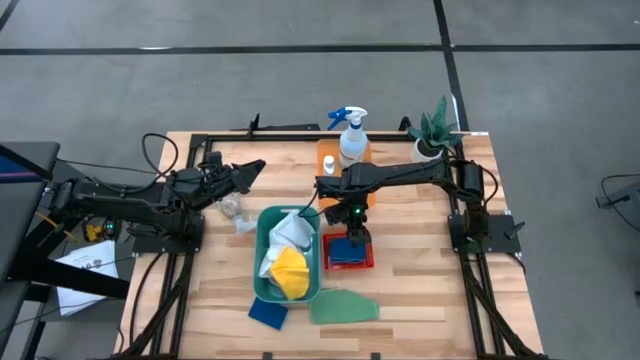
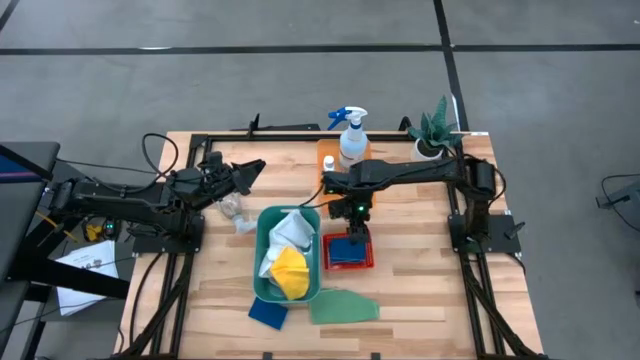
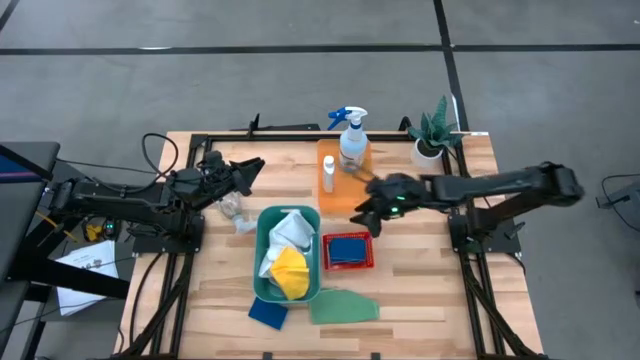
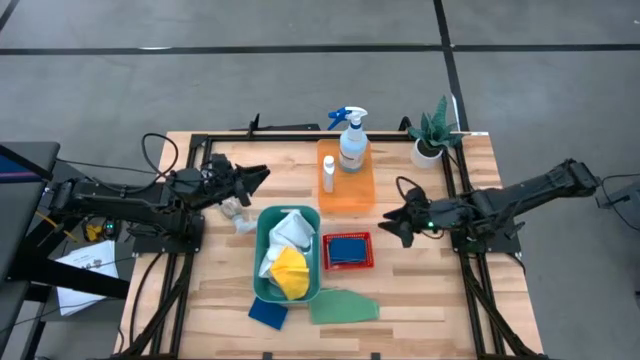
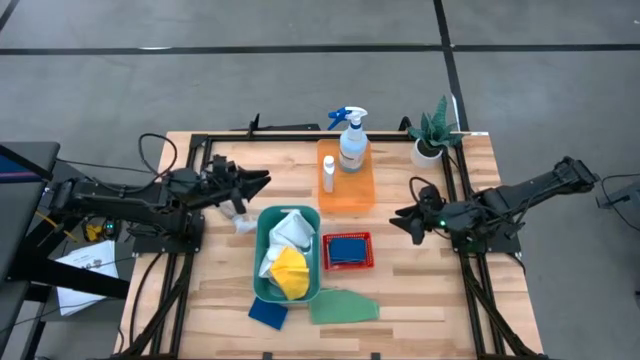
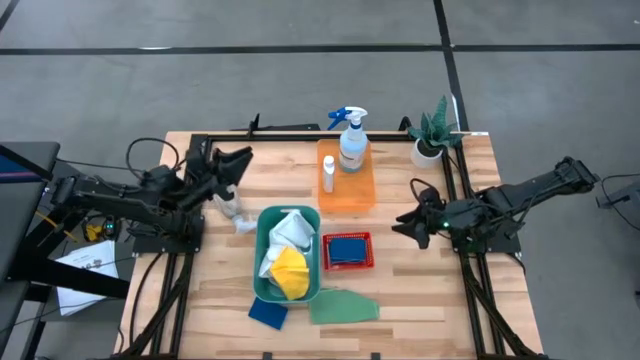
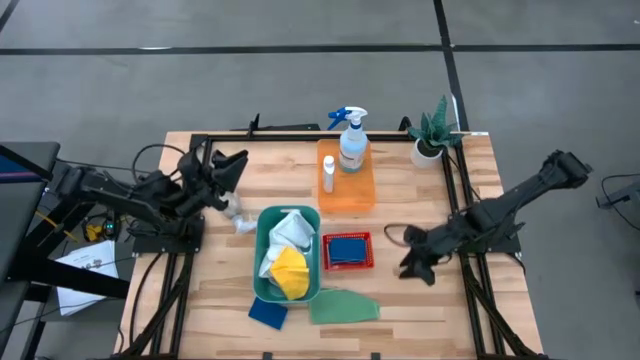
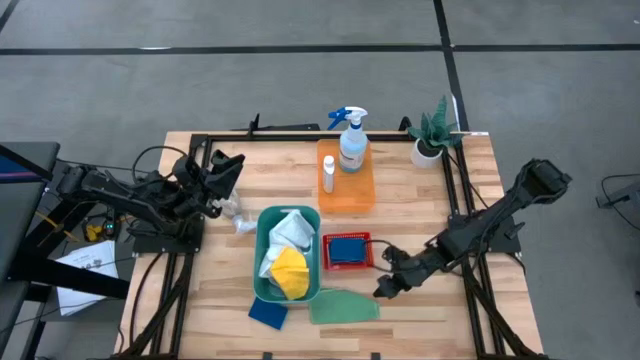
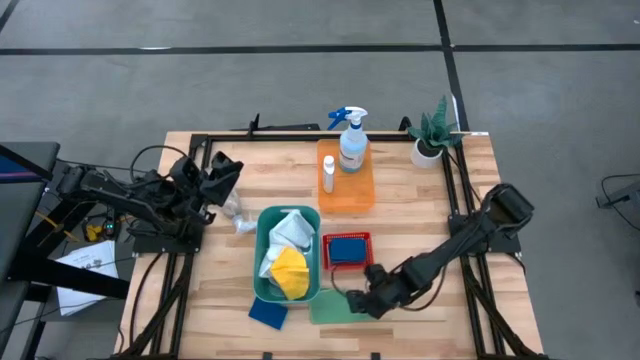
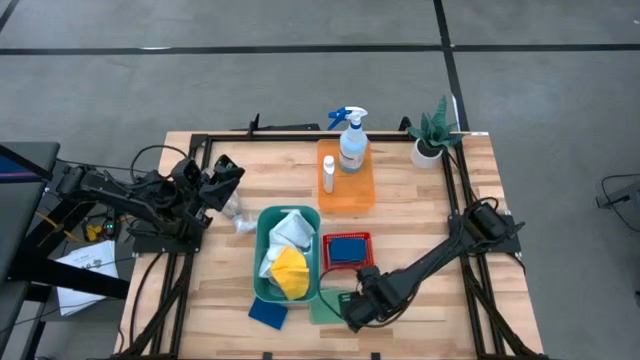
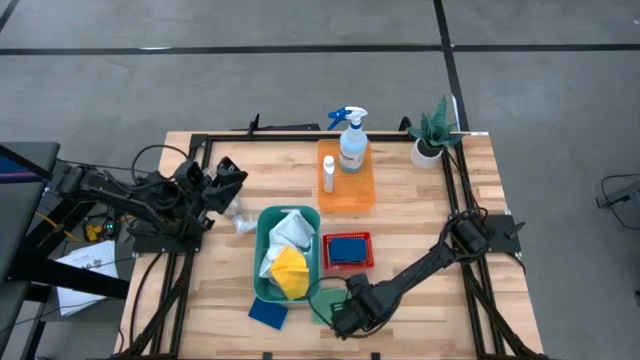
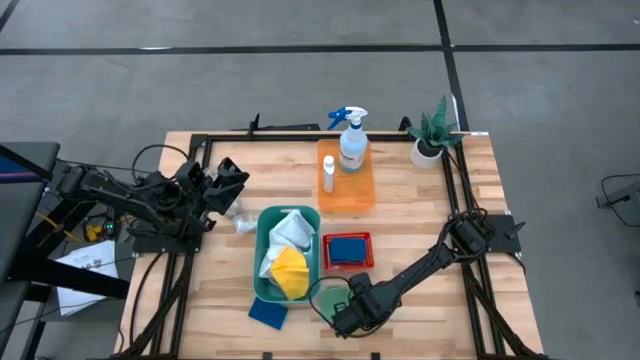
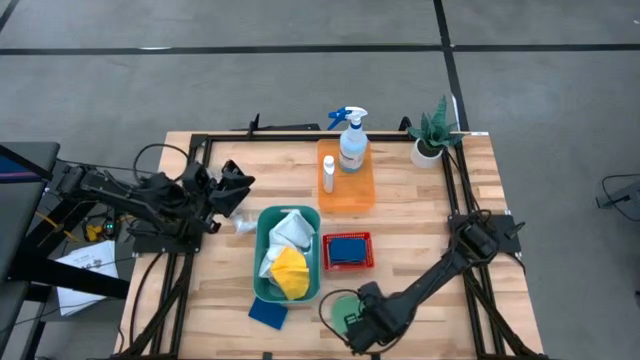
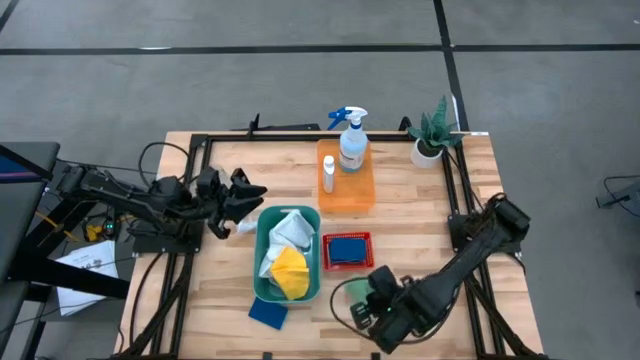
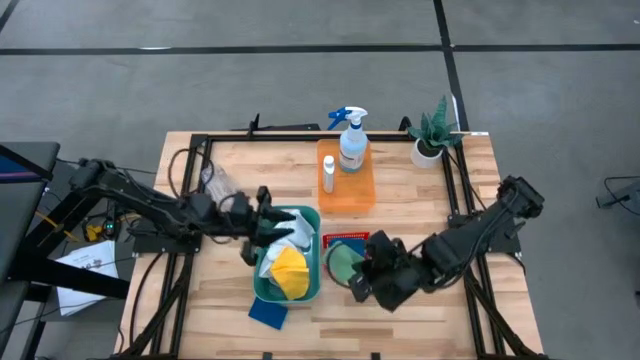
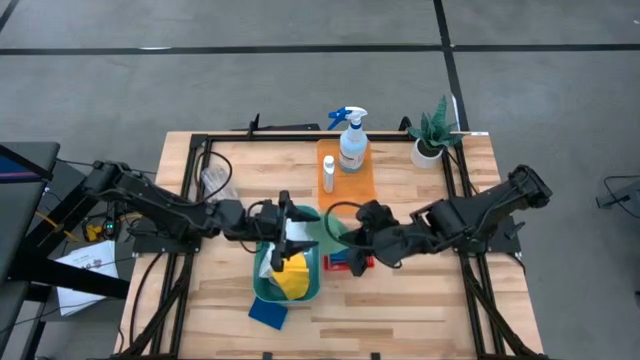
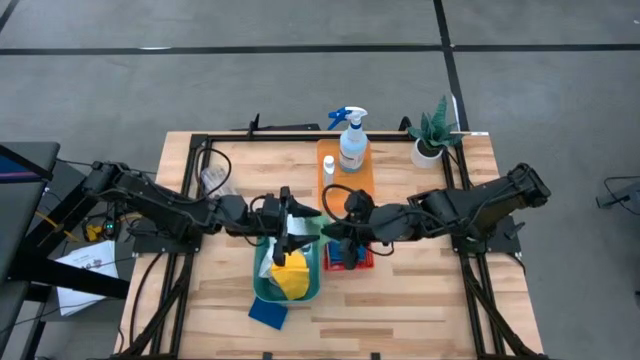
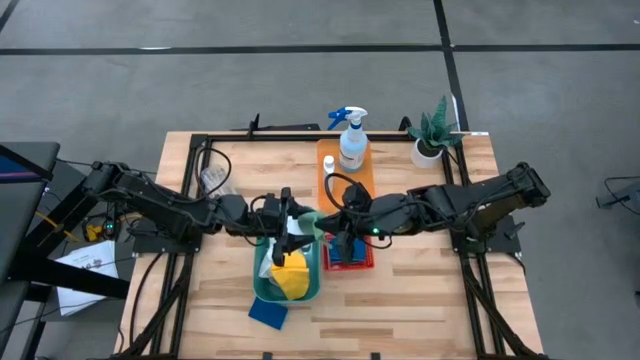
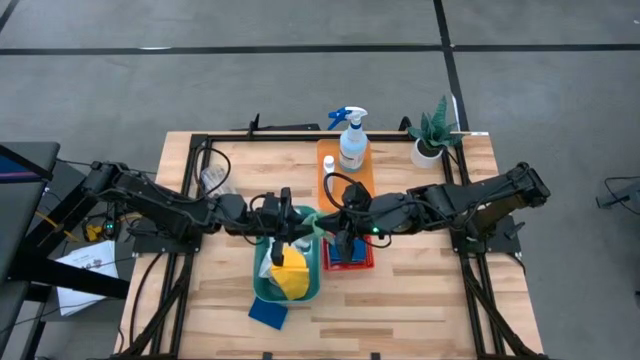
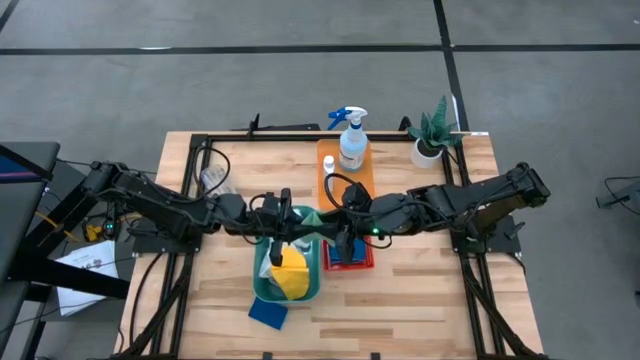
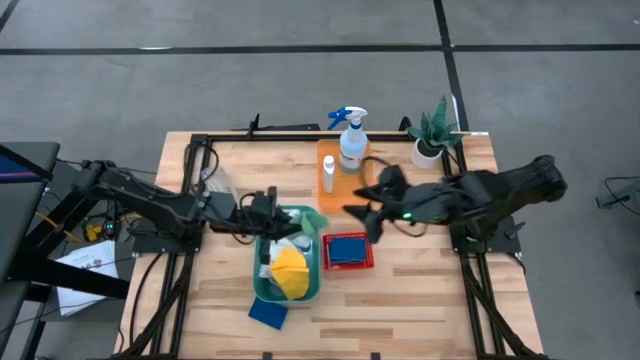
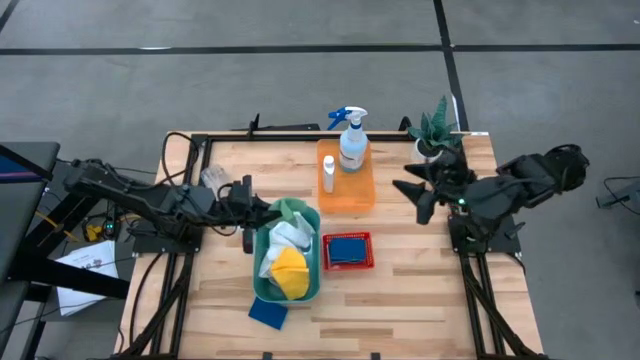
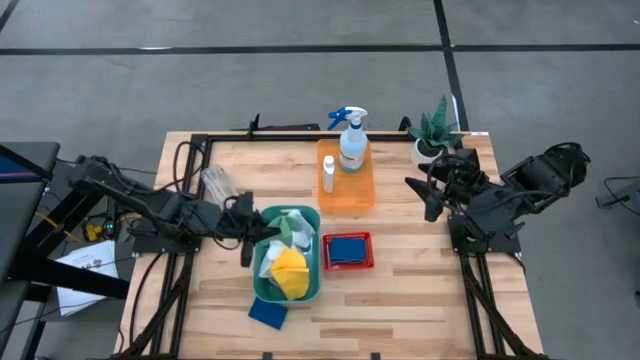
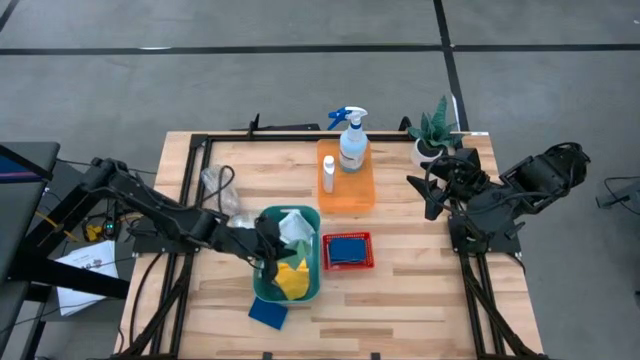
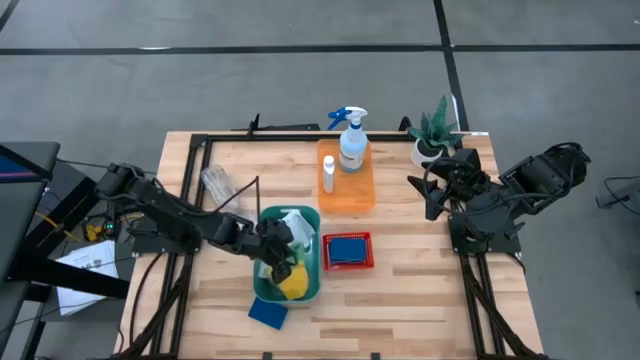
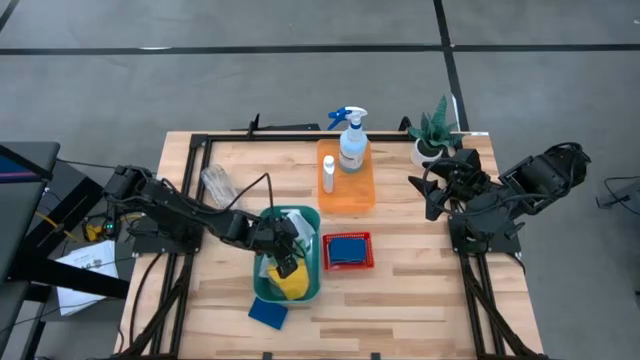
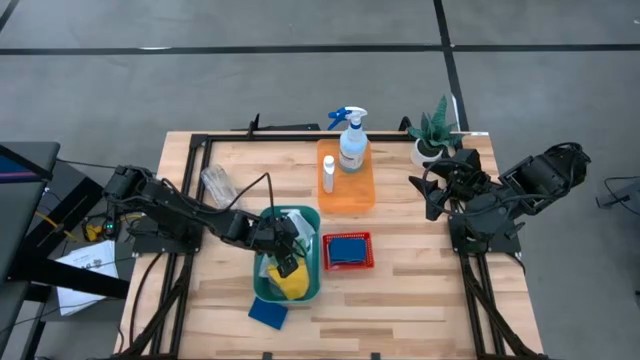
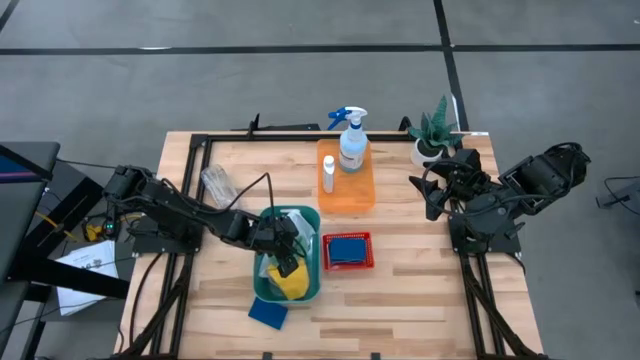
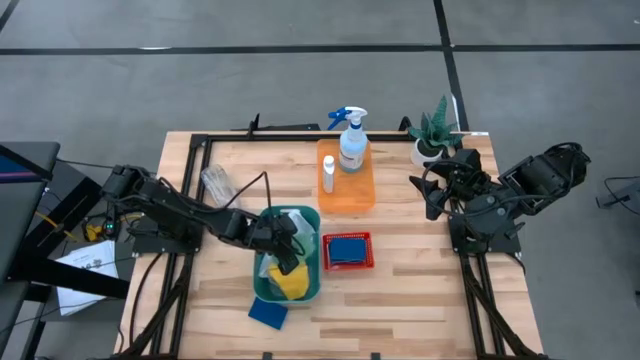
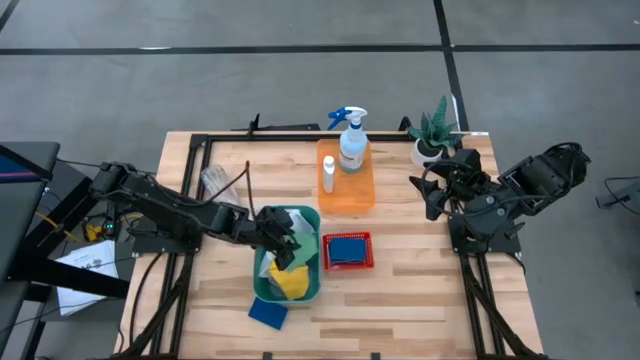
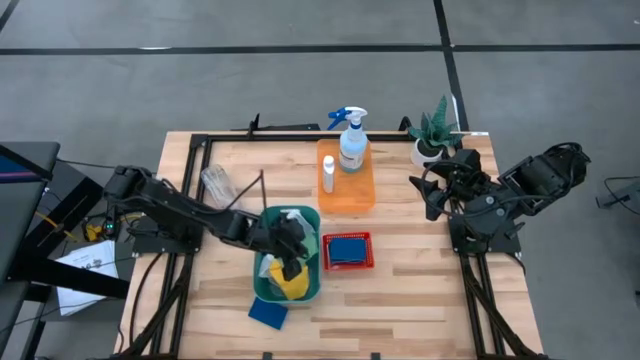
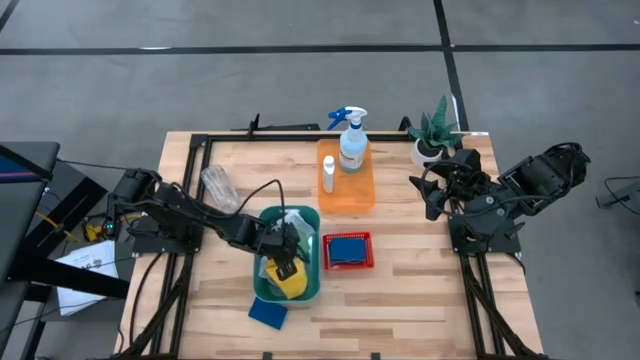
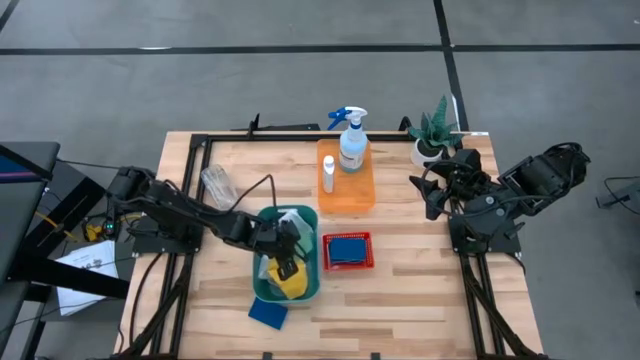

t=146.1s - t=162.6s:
Task: Pick & Place Kitchen Items
Put the green towel into the green bin

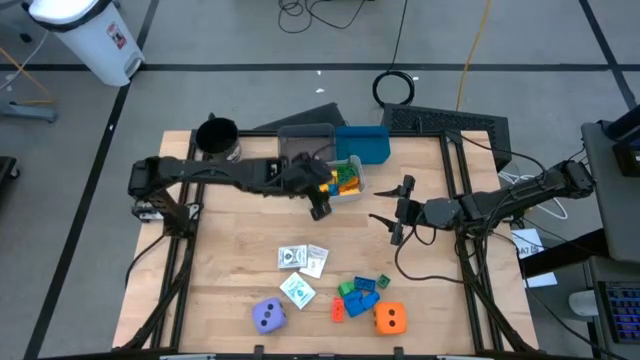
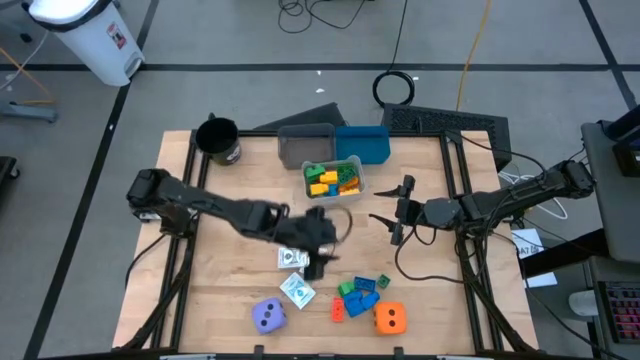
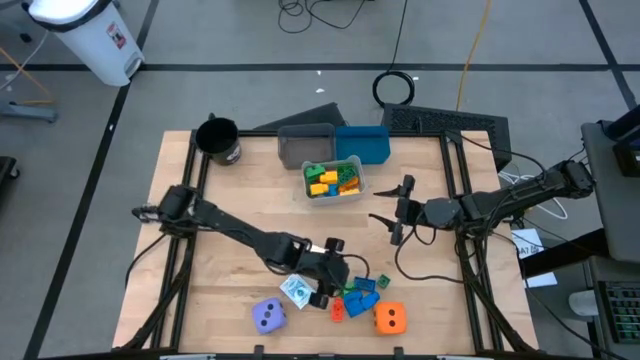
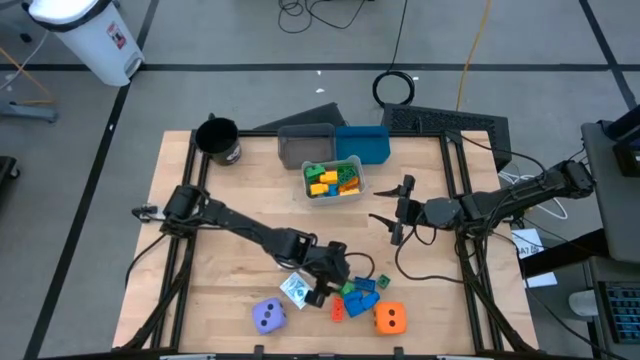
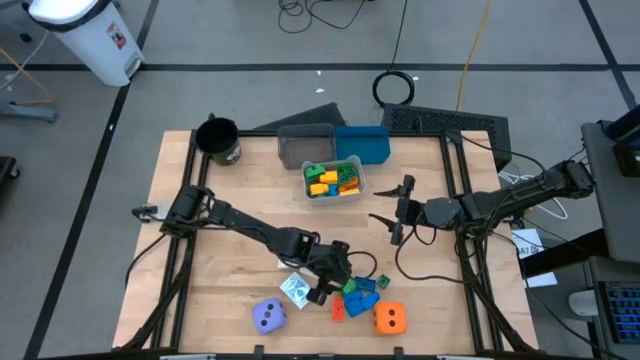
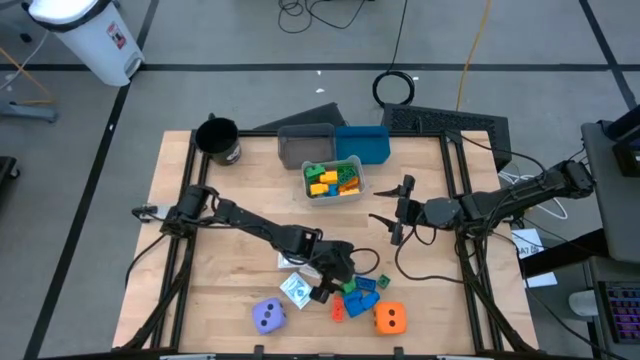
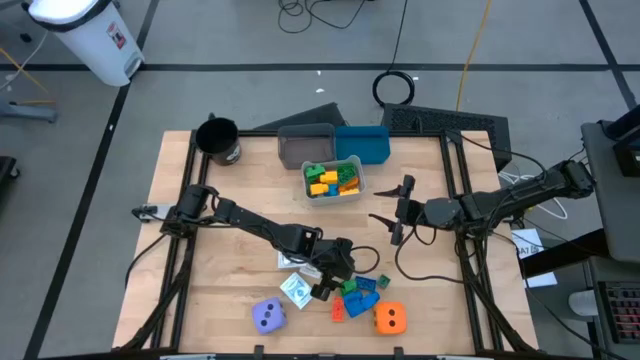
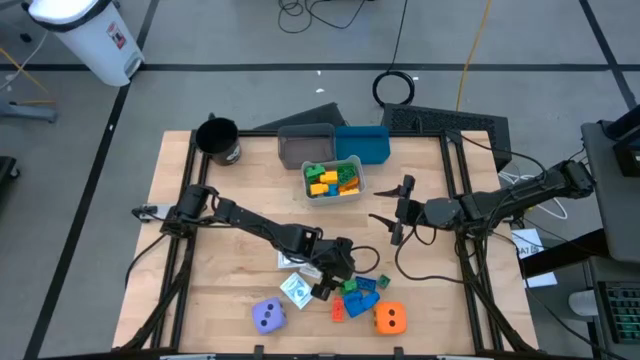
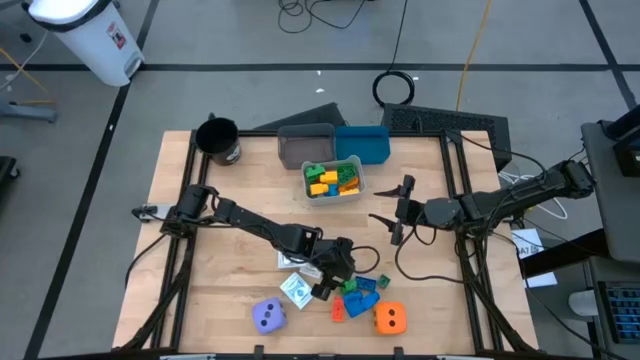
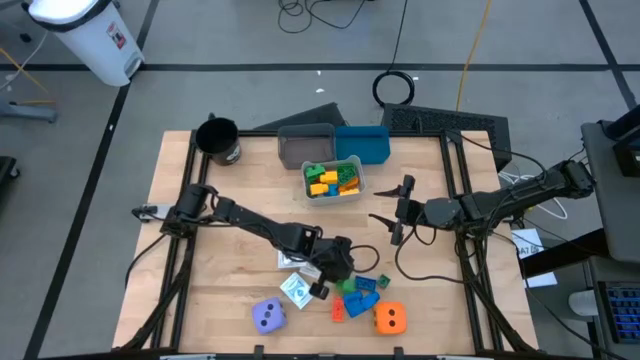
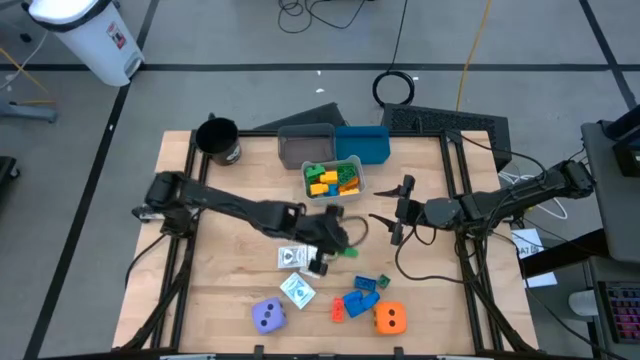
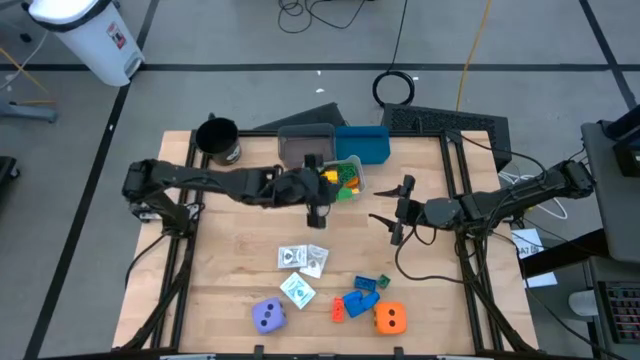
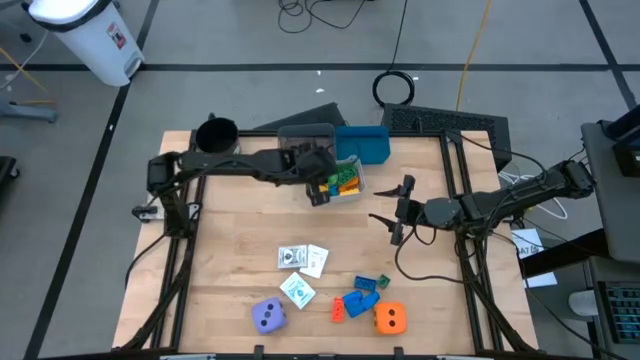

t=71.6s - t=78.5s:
Task: Pick & Place Toys
Put the green game piece into the gray bin
